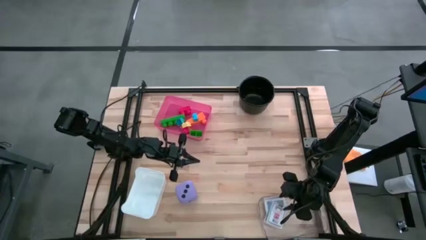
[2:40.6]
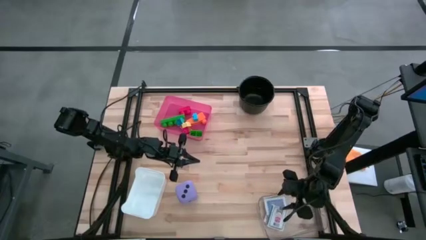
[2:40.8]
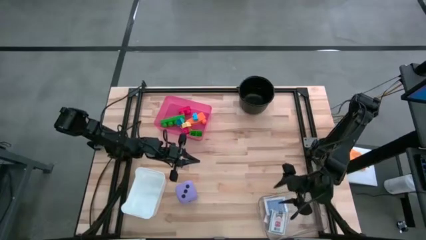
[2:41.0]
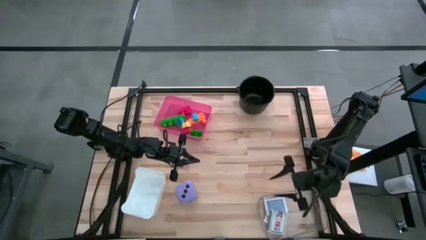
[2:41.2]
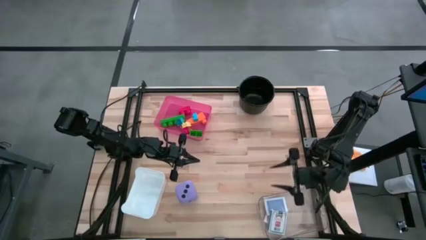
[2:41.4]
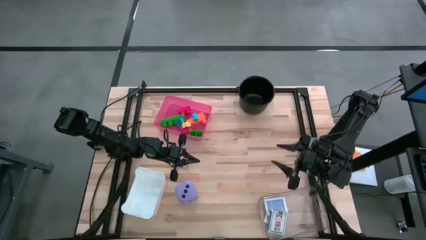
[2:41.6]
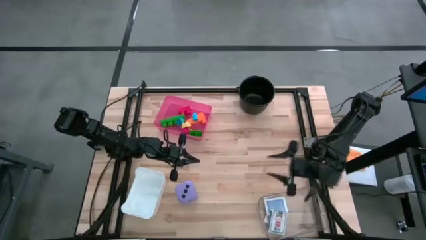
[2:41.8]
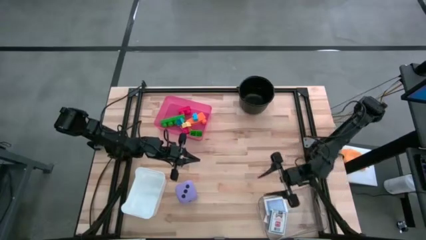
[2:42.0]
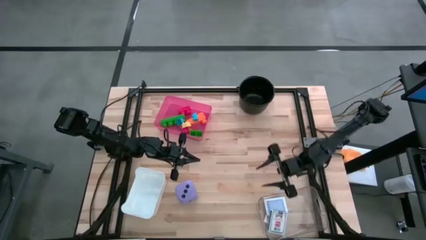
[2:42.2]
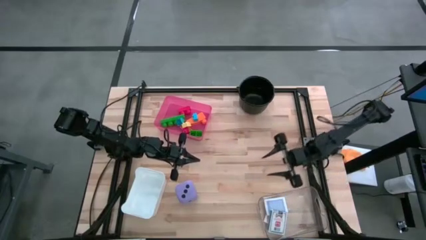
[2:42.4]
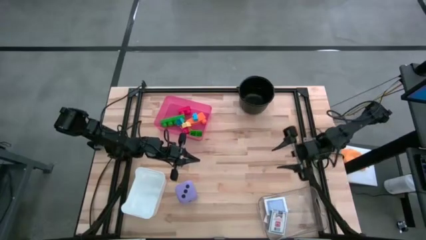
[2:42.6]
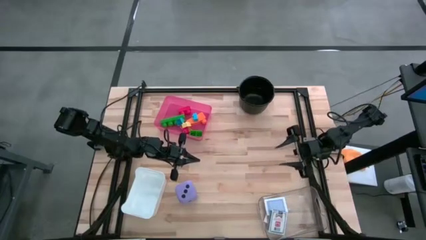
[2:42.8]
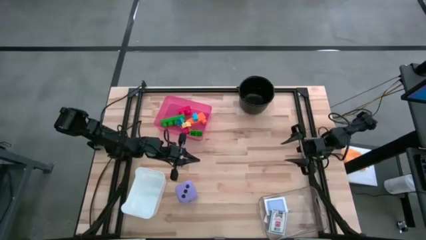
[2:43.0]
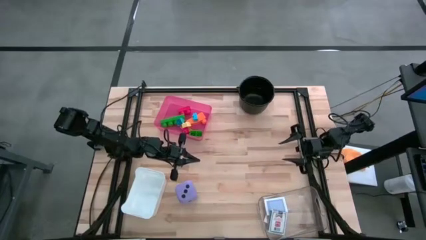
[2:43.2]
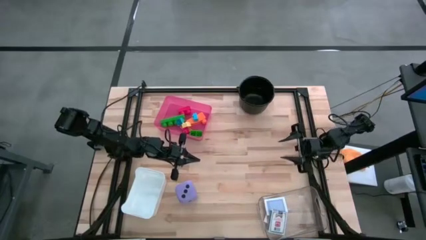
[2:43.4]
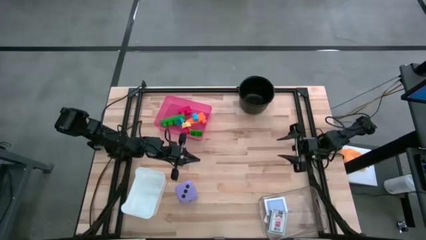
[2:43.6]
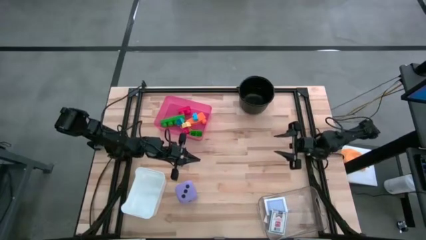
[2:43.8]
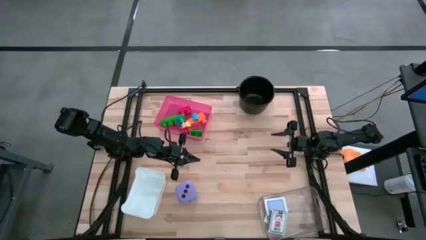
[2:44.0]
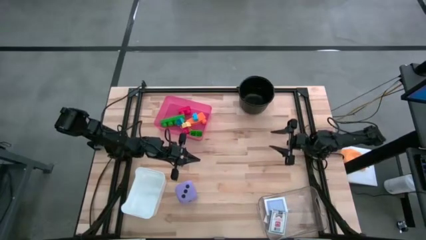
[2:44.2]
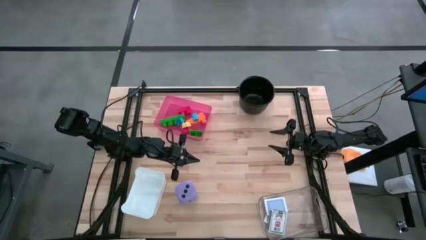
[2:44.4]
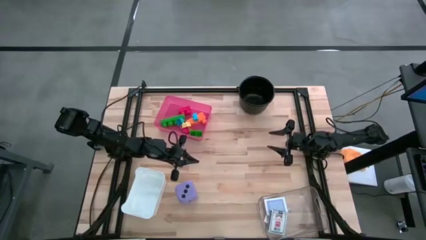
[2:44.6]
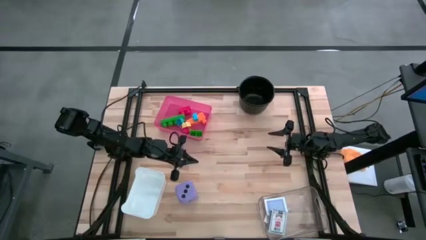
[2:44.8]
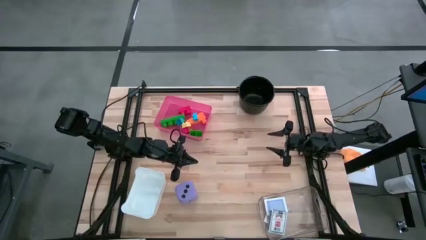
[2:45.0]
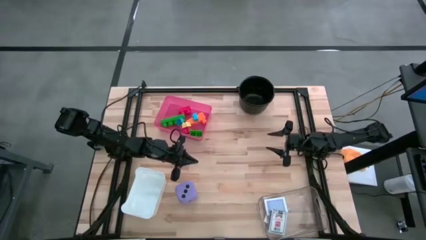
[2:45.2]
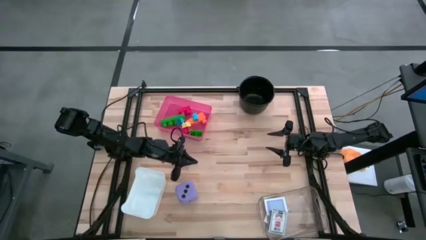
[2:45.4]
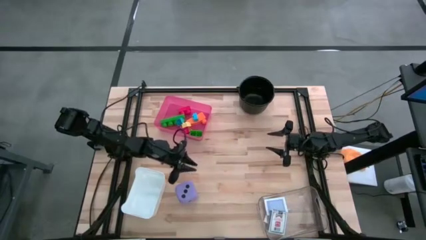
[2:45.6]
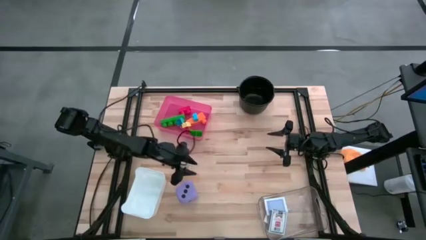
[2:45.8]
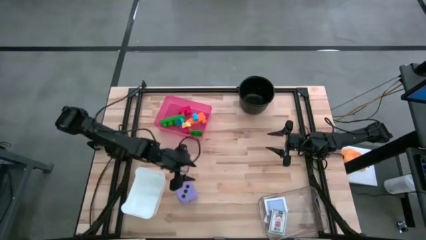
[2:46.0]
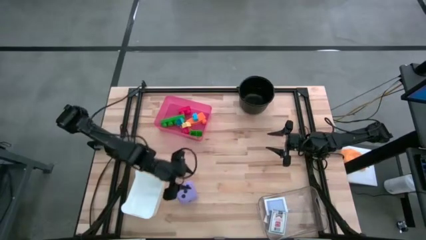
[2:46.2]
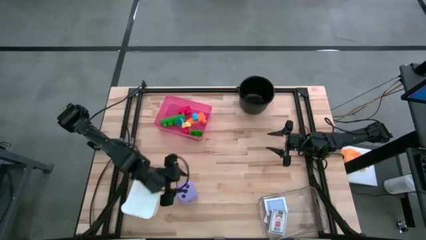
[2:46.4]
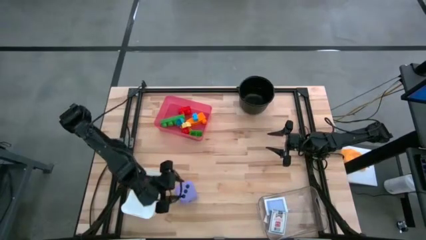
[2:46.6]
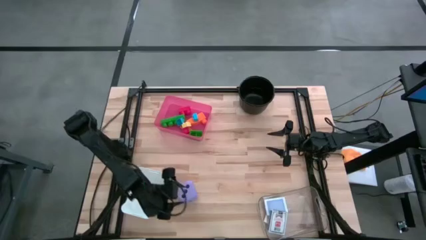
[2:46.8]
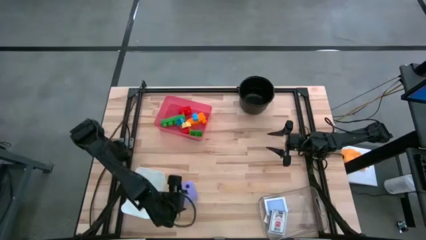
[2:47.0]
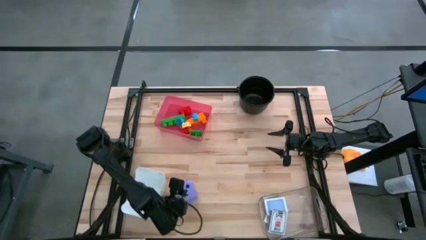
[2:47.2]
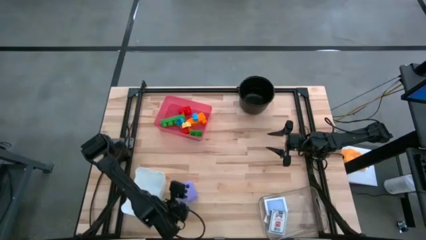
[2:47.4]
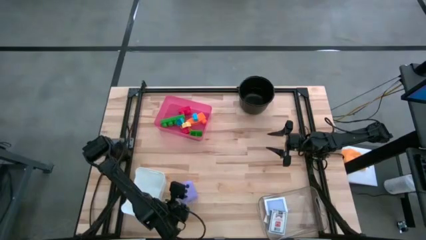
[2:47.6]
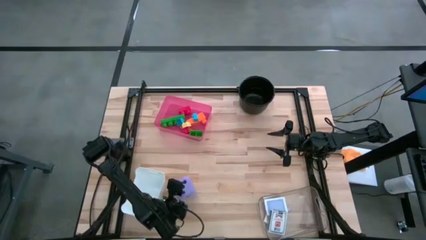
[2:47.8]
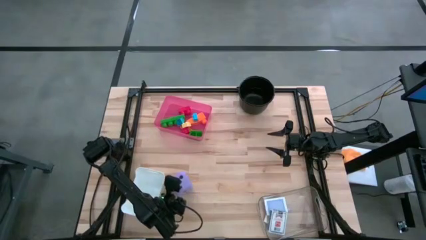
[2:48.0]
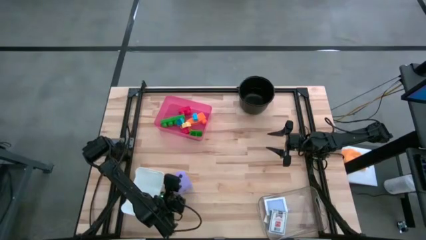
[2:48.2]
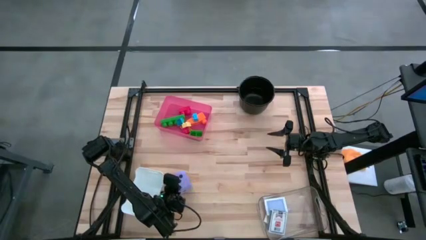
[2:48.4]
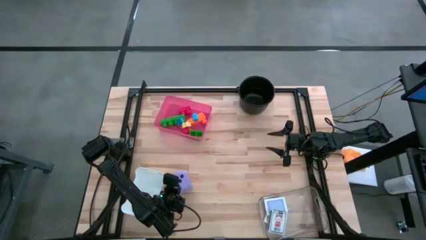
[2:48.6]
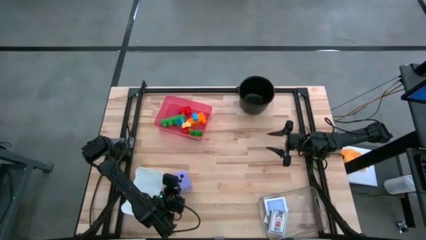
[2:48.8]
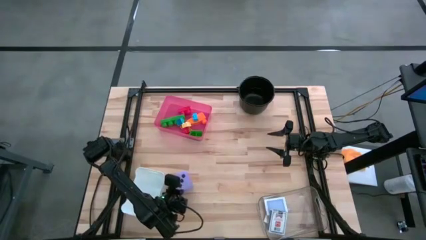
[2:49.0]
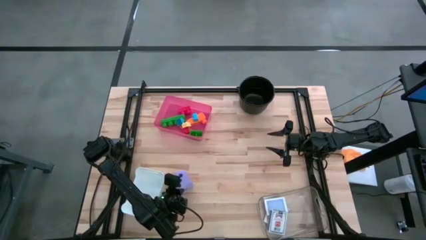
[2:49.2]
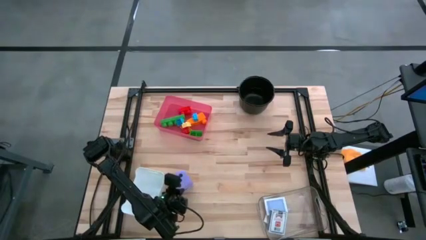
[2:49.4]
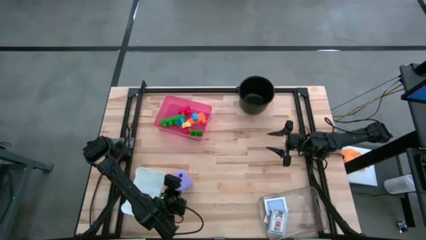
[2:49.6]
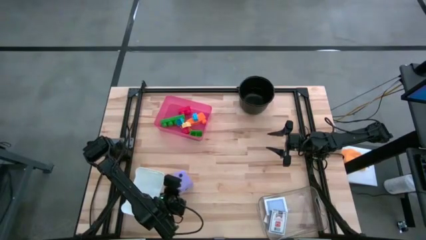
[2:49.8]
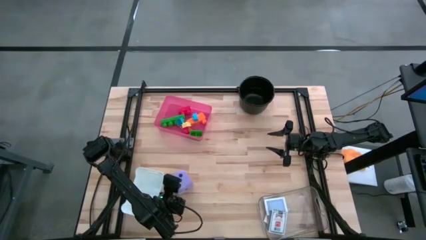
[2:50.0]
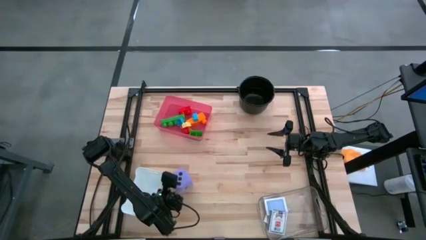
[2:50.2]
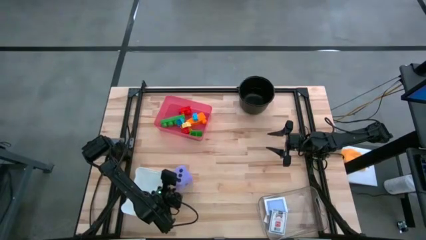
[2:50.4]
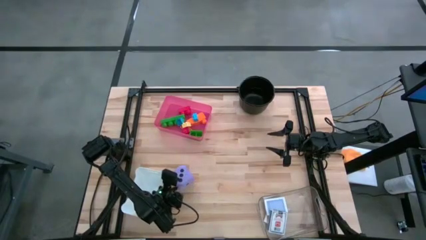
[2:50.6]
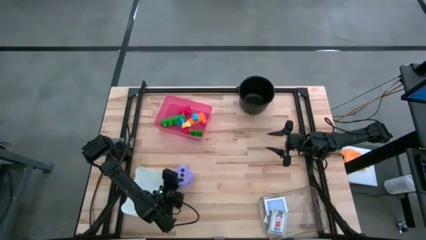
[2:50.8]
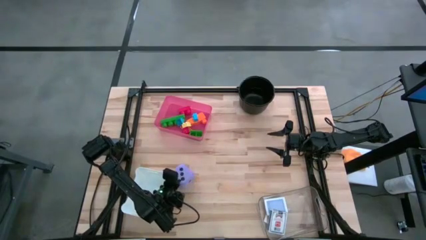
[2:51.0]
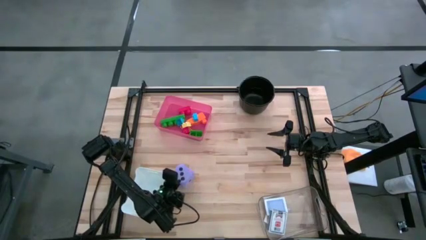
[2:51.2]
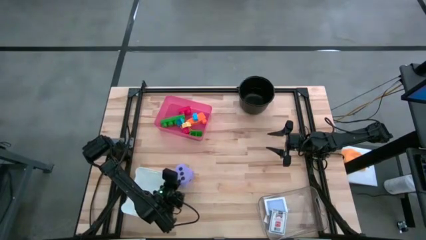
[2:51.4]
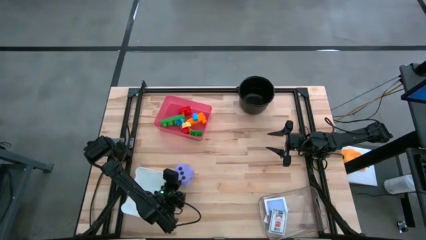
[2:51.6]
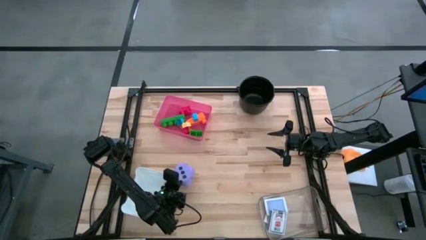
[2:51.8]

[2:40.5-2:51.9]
Task: Pick & Place Toys
Put the purple dice into the white bin

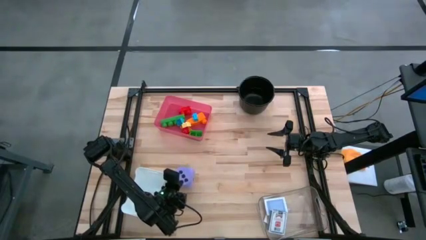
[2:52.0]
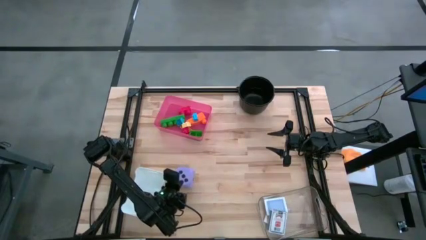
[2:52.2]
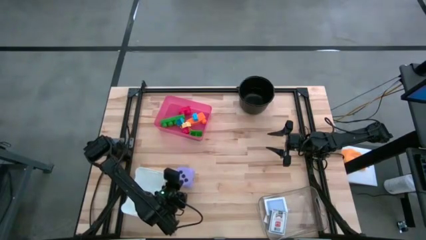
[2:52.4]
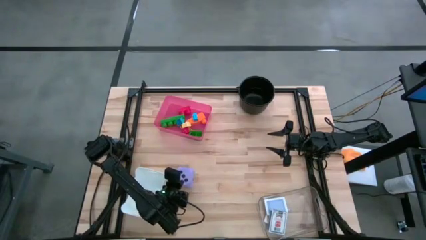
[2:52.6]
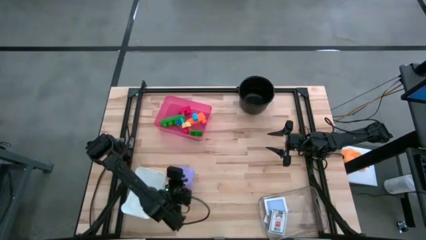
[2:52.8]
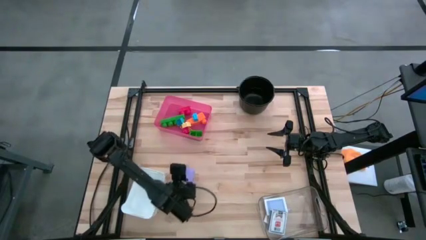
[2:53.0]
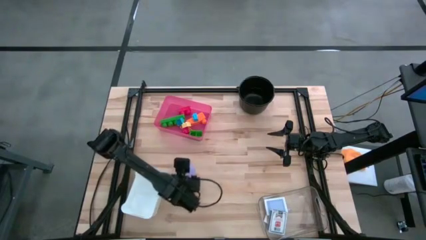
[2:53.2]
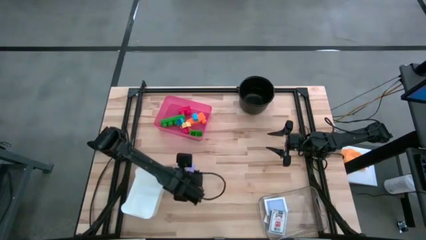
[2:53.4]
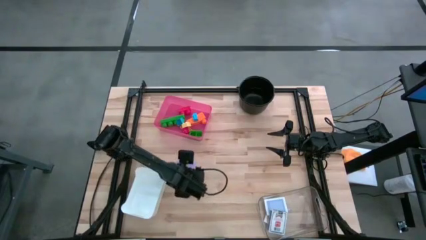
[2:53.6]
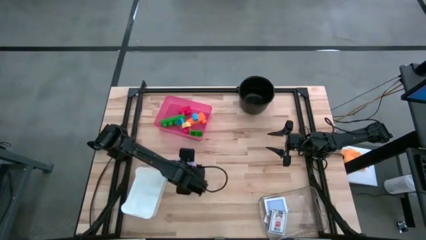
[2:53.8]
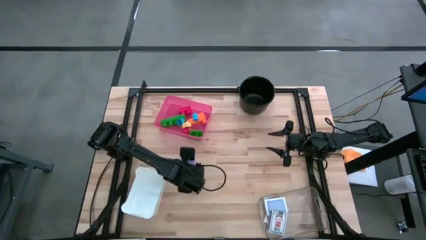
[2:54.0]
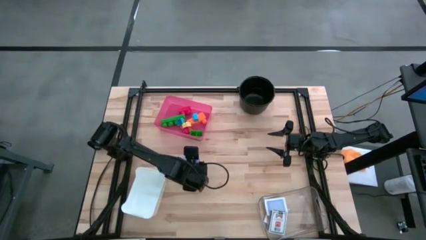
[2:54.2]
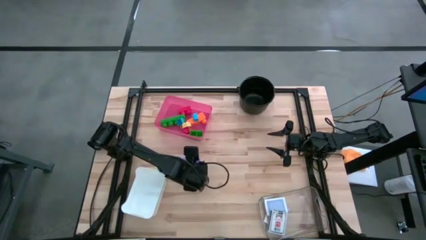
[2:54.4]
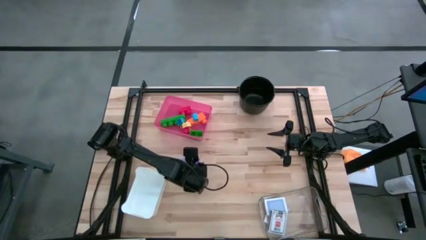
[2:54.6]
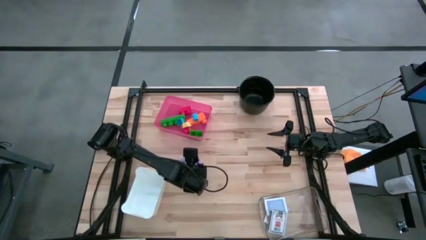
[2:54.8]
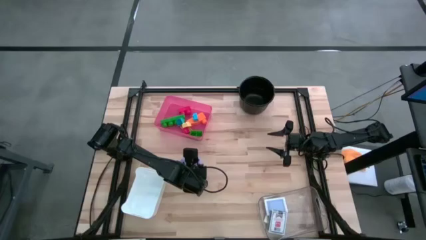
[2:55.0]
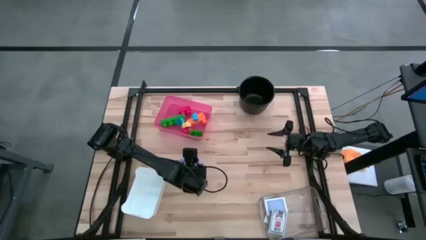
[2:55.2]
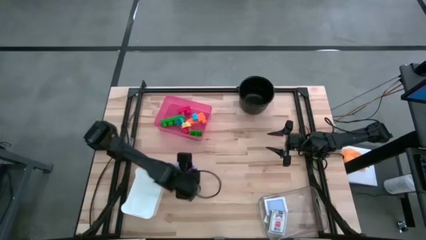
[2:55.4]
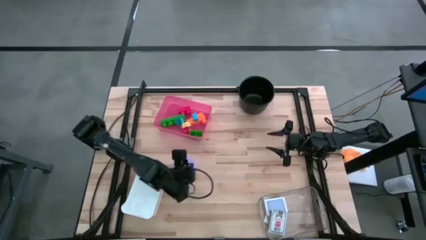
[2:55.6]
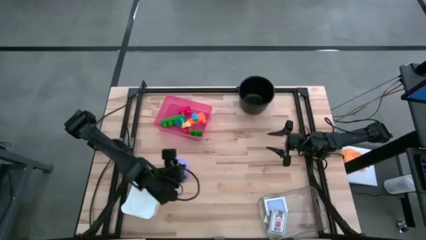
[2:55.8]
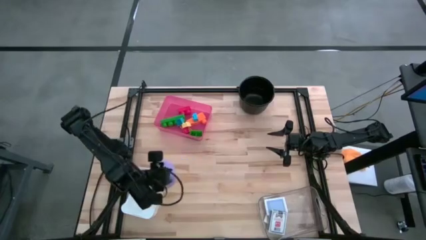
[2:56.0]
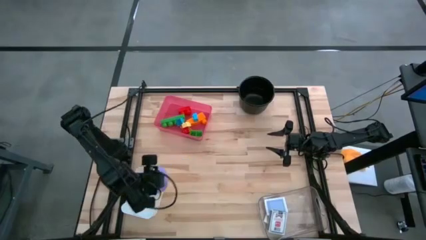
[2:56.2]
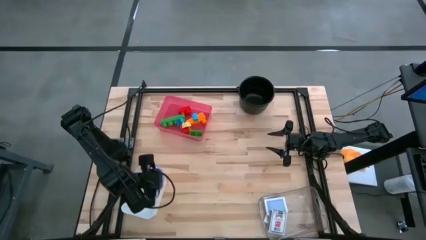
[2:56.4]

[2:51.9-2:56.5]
Put the purple dice into the white bin
